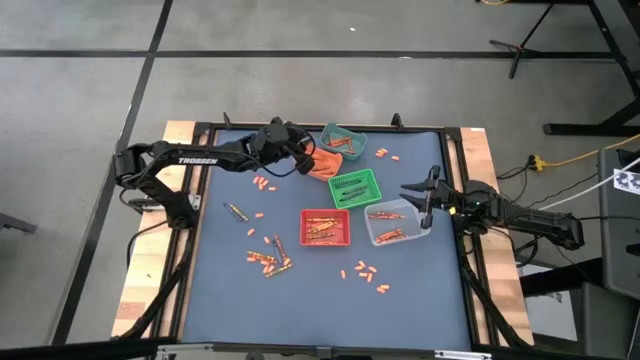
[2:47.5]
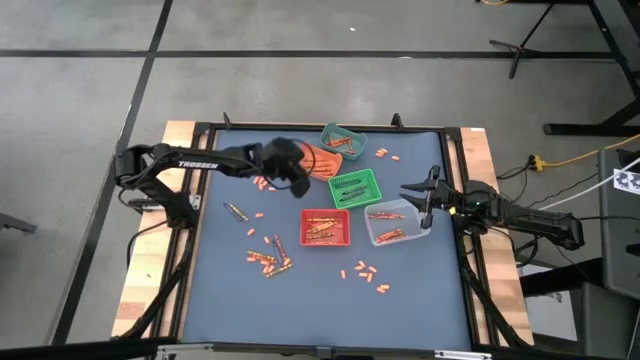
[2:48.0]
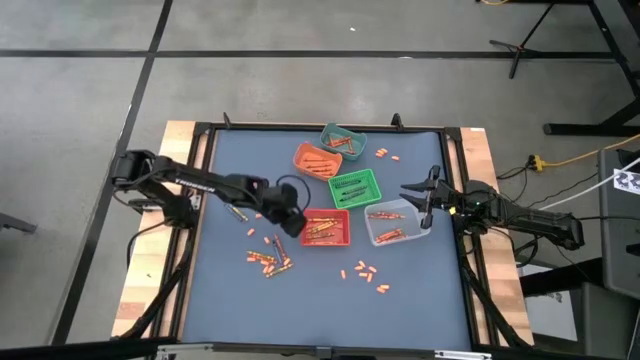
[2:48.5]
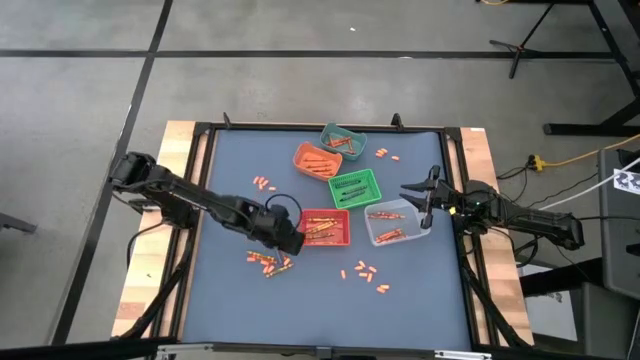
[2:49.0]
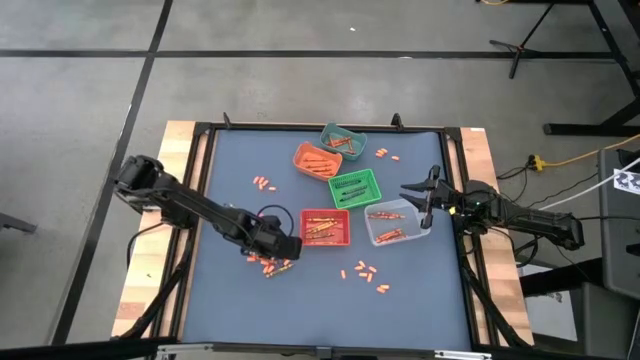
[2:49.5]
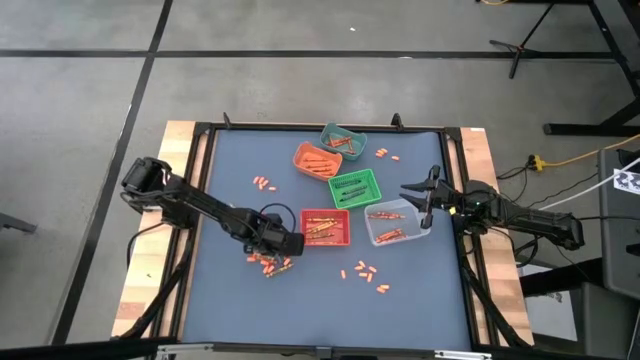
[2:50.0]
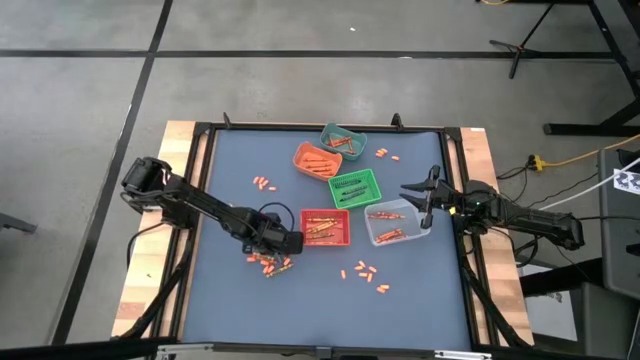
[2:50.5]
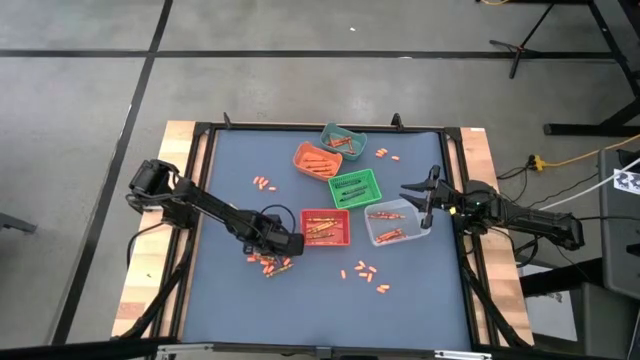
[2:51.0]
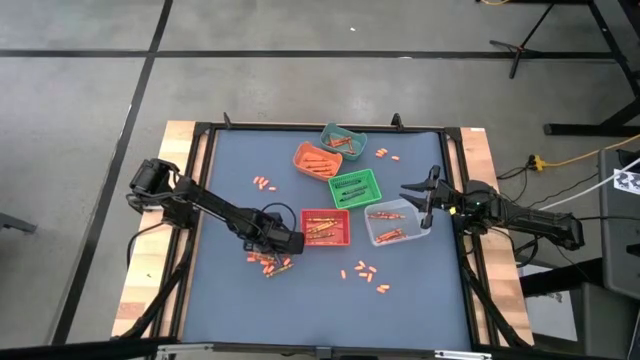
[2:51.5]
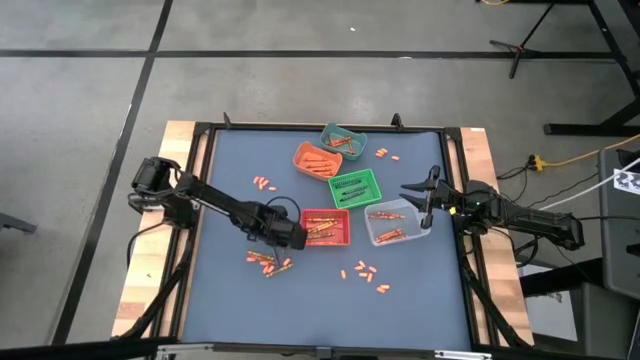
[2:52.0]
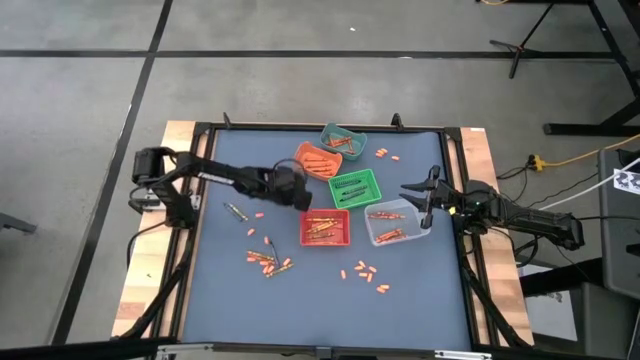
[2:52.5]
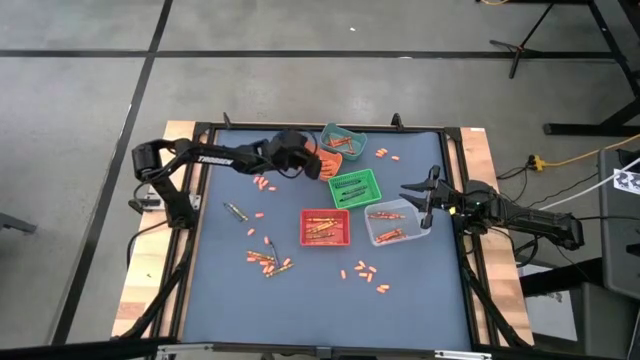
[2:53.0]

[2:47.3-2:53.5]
Task: Sort crayons
Put the orange crayon into the orange bin

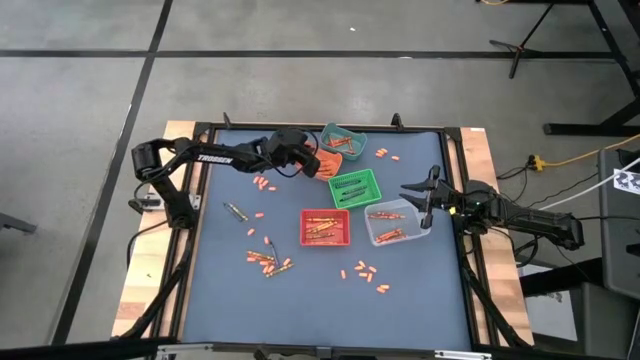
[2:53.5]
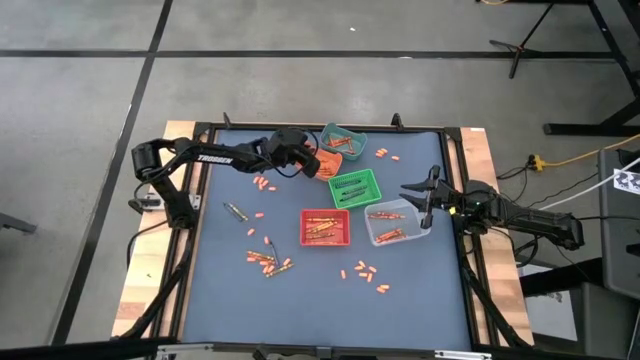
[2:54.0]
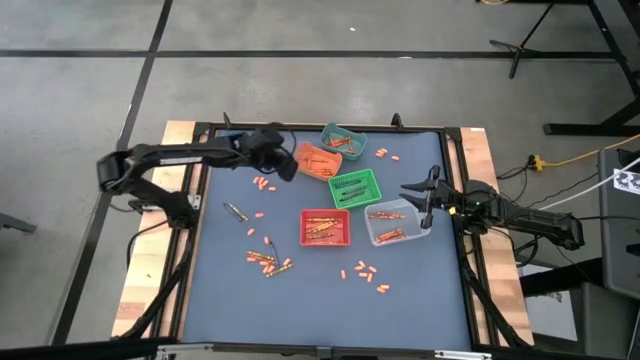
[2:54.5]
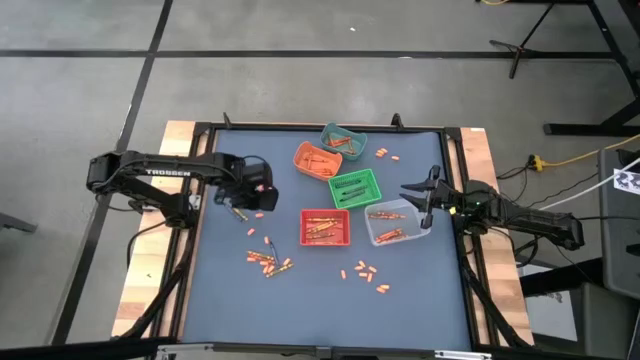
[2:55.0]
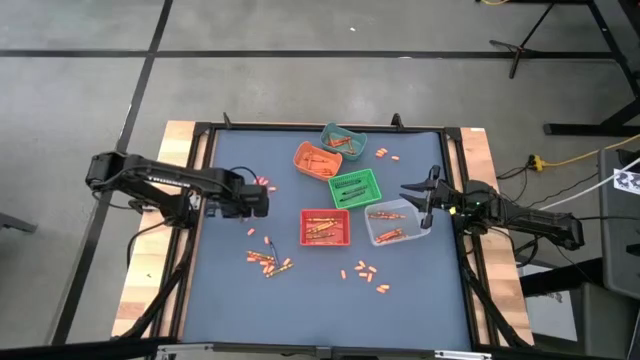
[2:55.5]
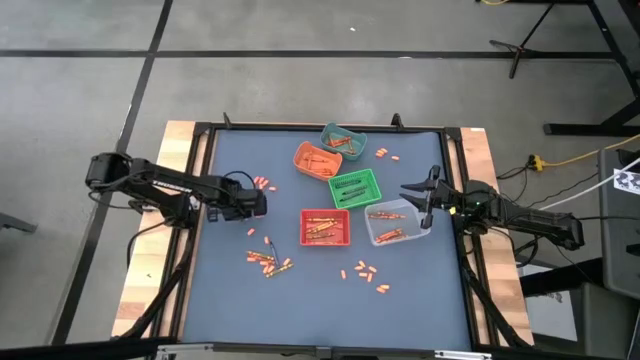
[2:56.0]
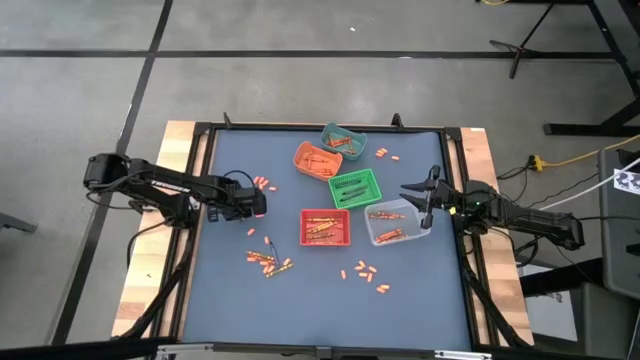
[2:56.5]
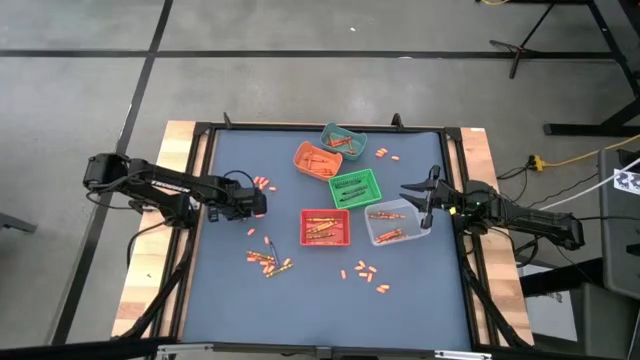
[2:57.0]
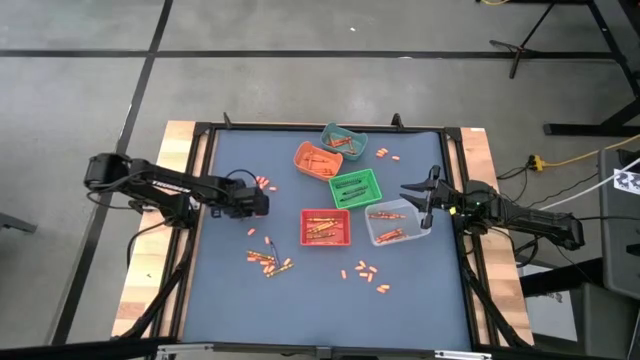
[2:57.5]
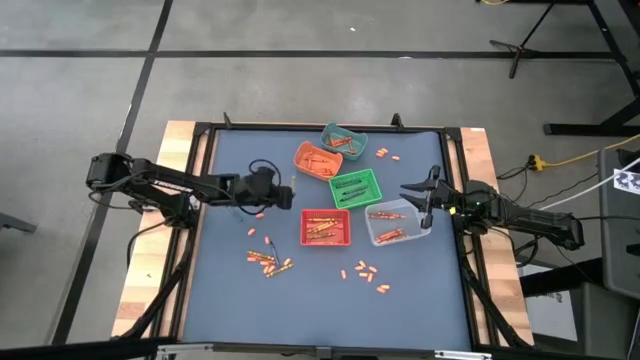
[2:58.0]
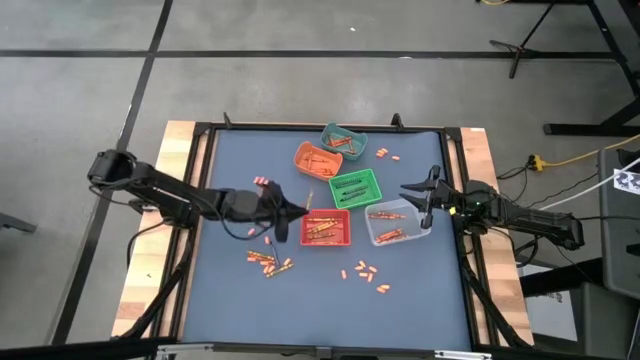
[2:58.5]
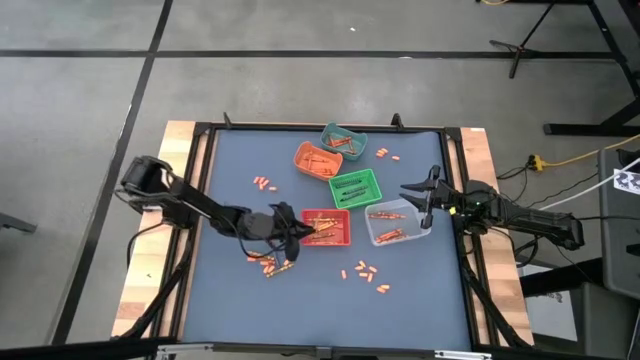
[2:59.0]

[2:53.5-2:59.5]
Put the yellow crayon into the red bin

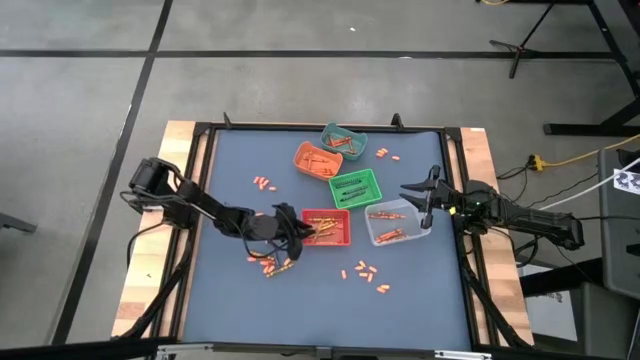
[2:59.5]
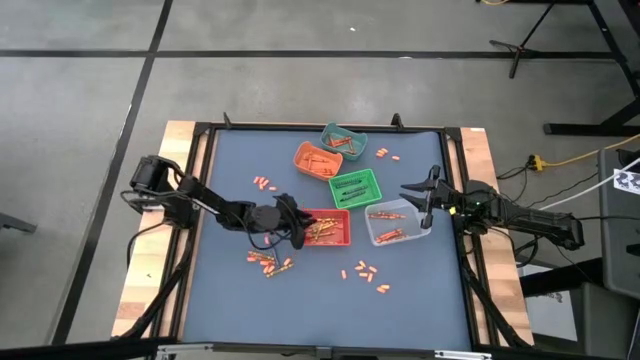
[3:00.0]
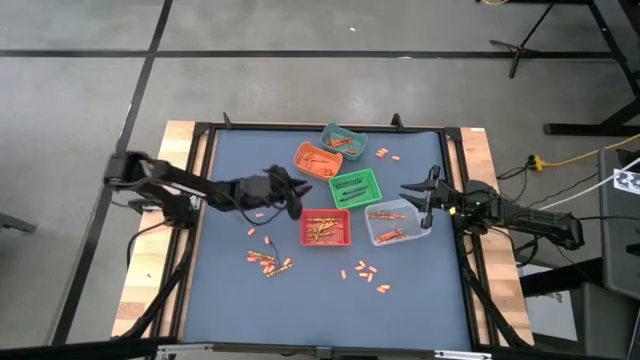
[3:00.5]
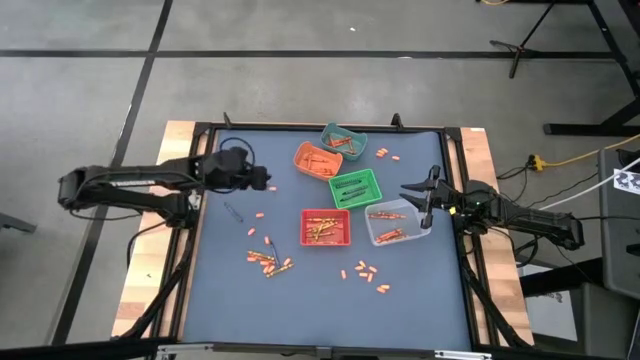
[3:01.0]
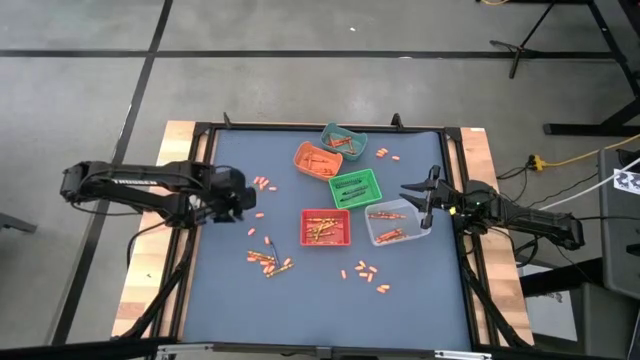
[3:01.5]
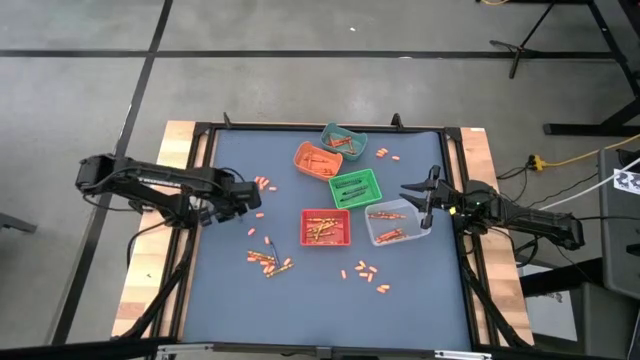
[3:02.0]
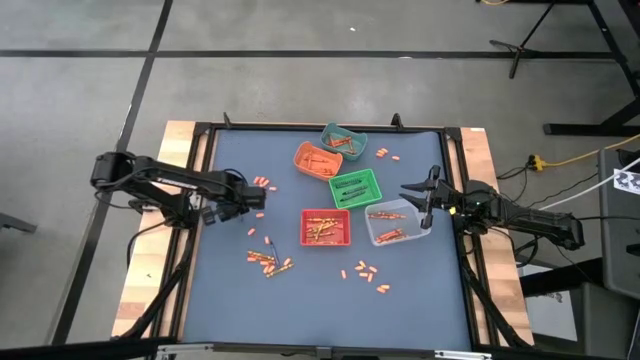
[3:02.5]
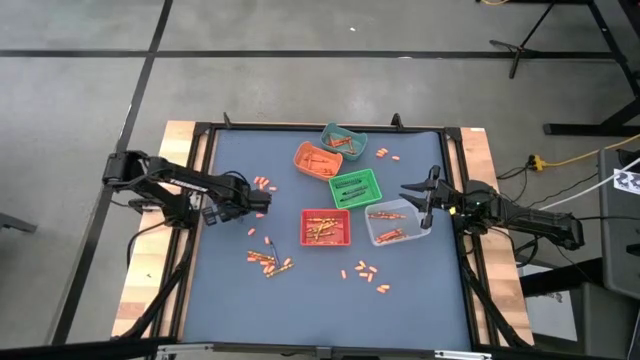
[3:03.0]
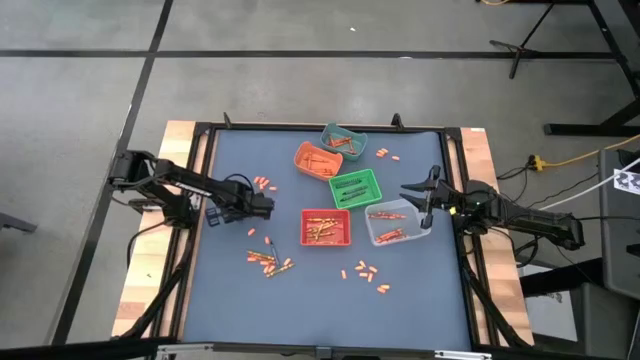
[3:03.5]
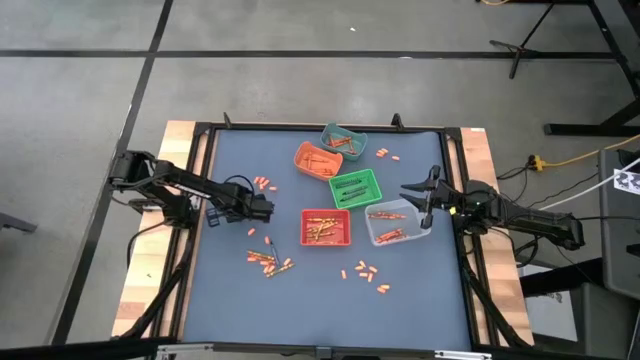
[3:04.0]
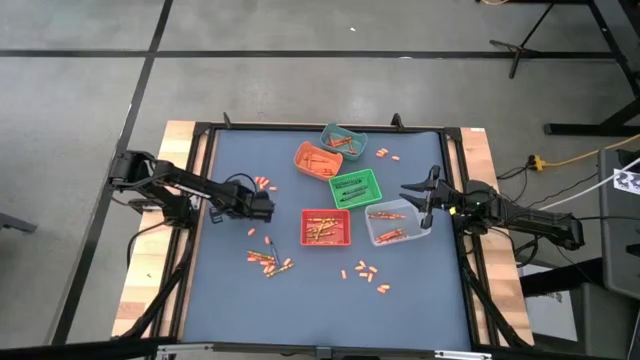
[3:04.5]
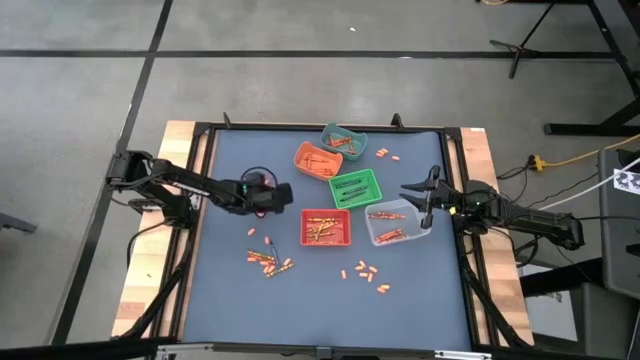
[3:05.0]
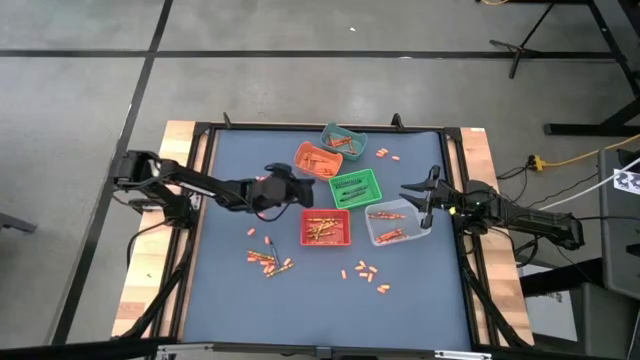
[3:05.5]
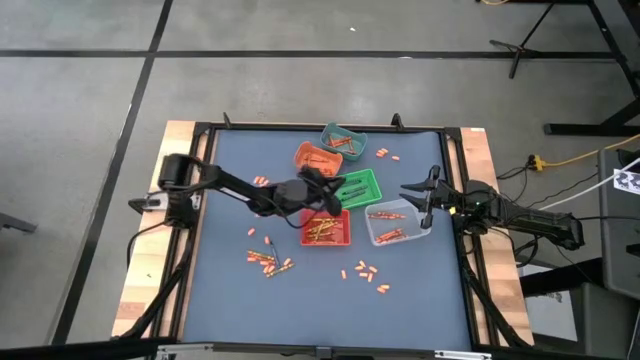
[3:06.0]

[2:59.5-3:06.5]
Put the blue crayon into the green bin

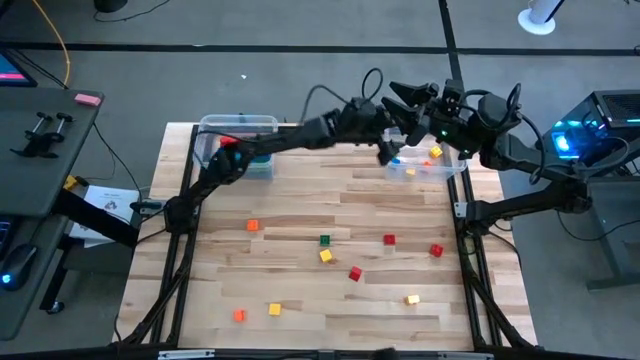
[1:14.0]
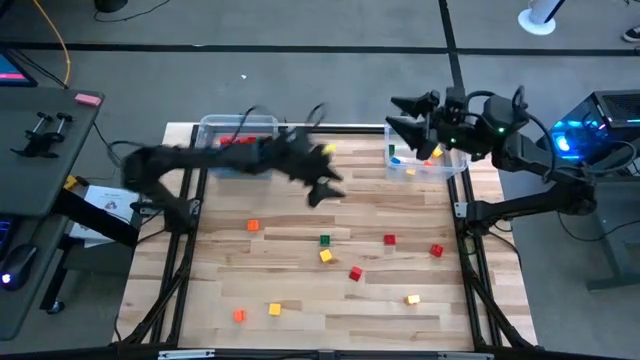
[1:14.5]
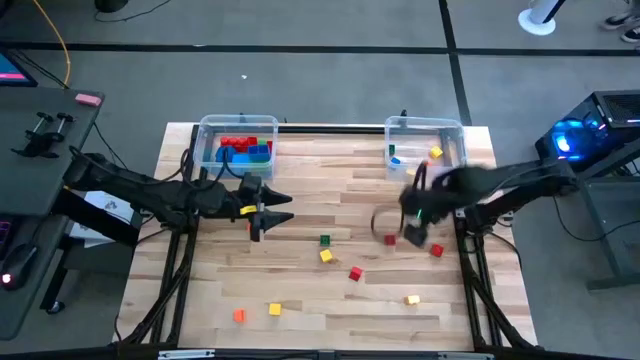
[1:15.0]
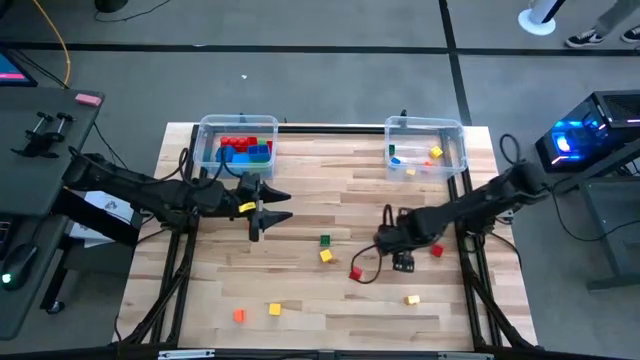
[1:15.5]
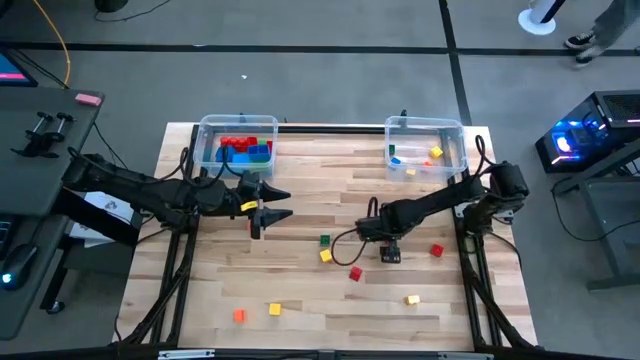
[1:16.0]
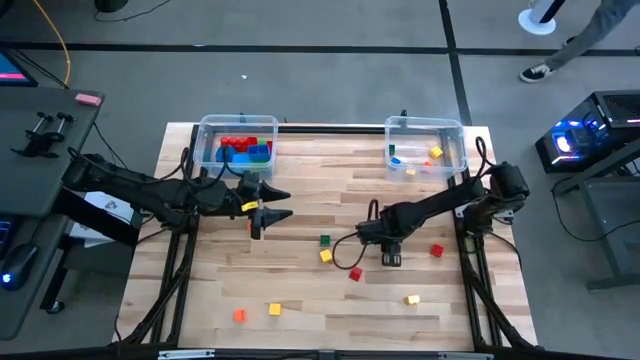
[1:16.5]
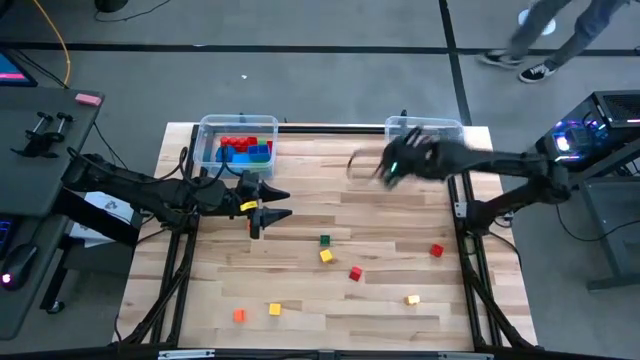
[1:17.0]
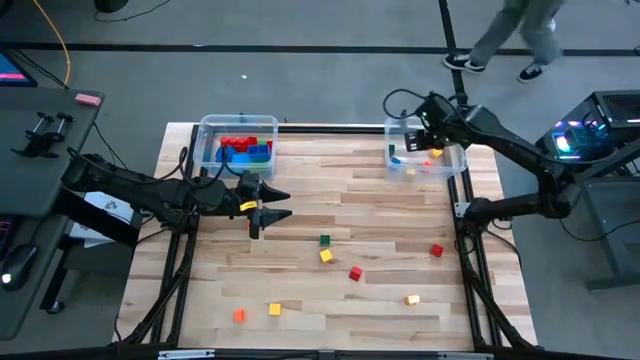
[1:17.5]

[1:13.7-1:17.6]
Task: Sort blocks by size
Put the small game piece into the right transparent bin
